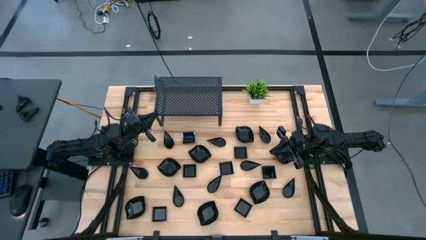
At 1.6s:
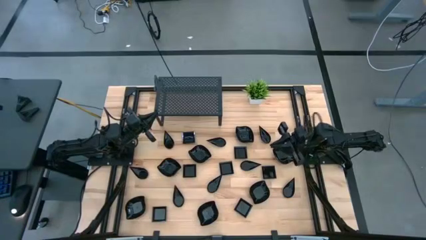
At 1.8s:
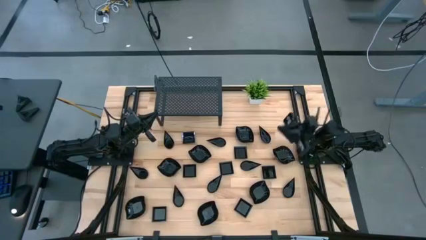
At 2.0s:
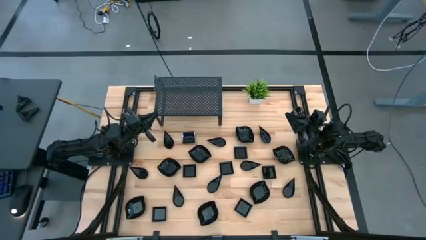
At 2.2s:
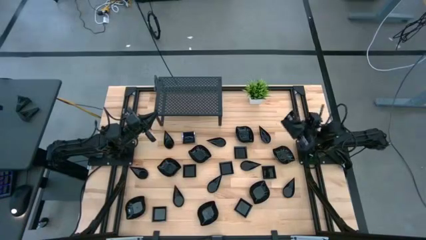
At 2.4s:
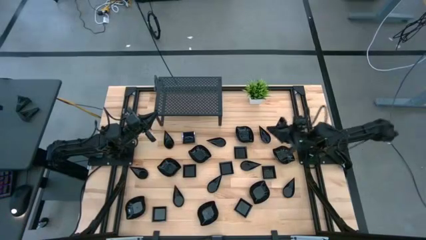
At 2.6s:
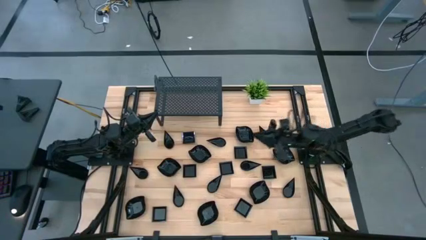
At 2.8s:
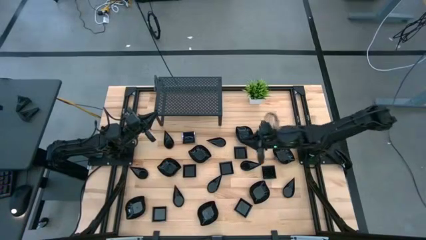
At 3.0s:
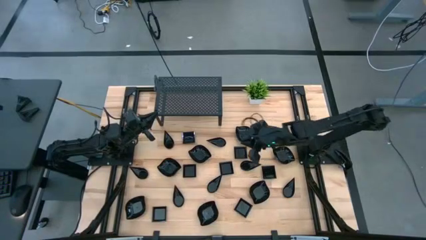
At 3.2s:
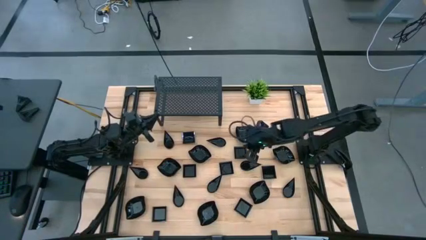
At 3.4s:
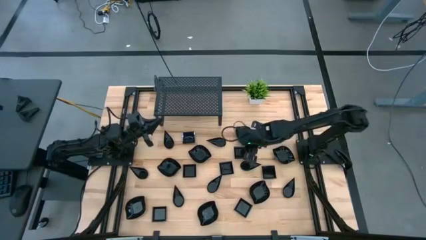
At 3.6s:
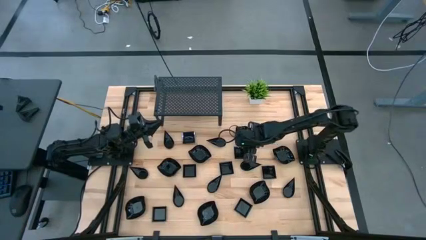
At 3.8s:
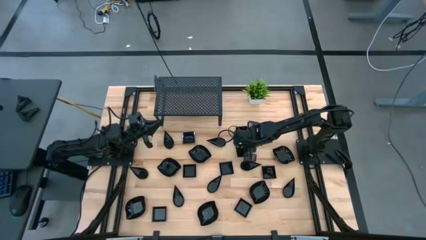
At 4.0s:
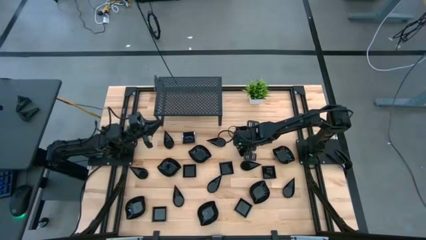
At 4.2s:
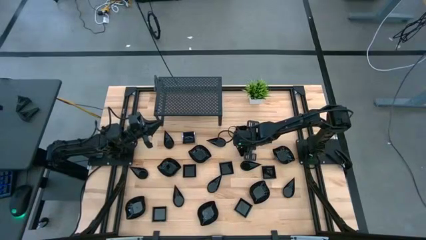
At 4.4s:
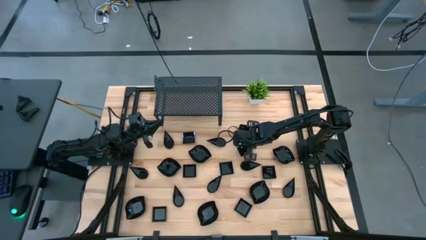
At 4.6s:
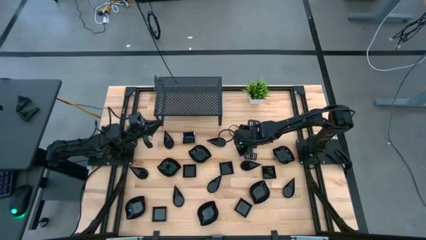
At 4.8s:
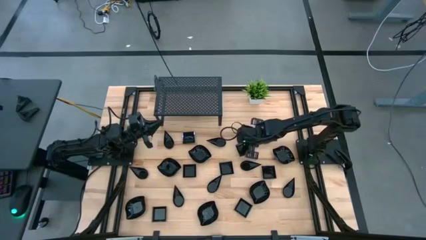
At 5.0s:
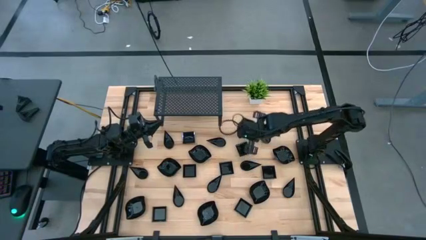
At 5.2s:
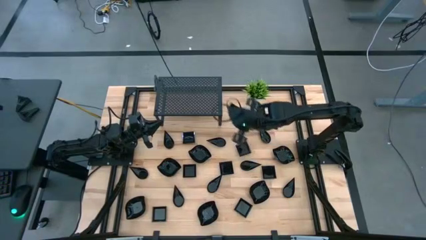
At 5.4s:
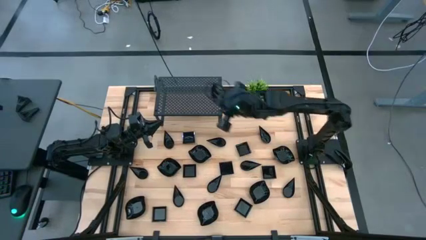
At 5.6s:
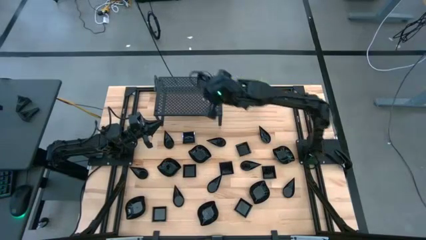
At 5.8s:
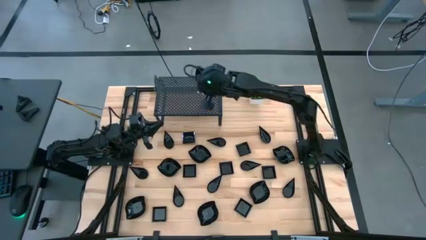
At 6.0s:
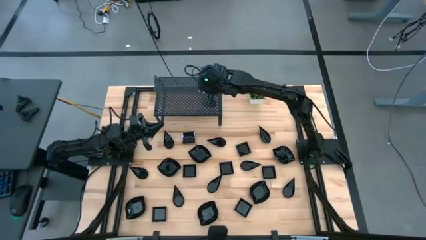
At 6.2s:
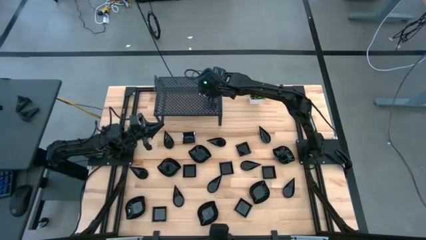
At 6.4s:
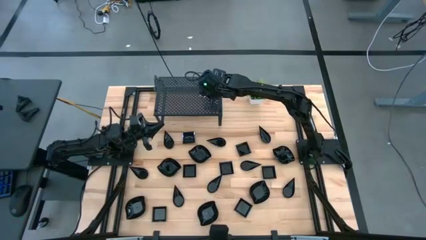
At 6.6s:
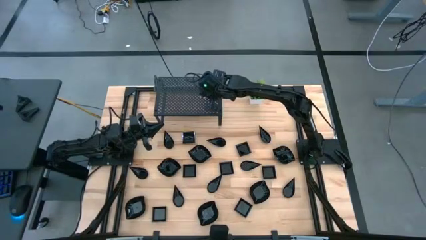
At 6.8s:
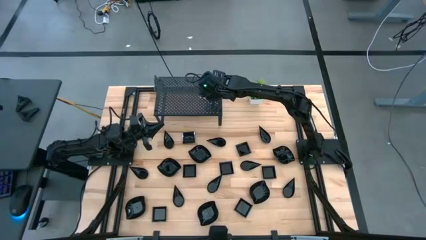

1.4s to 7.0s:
Task: Pick & Place Mini shaped plates
Put the black leaf-shaped plate on the shelf

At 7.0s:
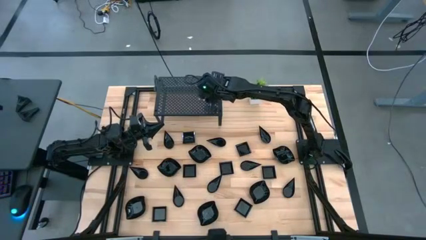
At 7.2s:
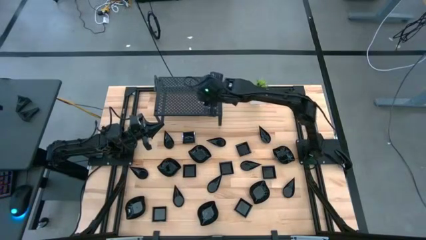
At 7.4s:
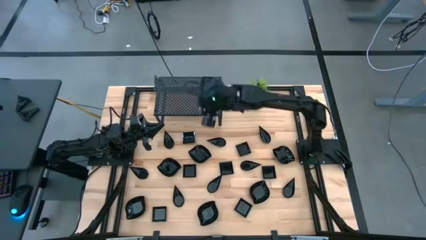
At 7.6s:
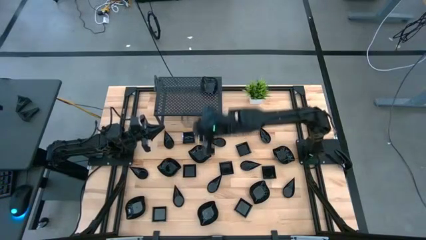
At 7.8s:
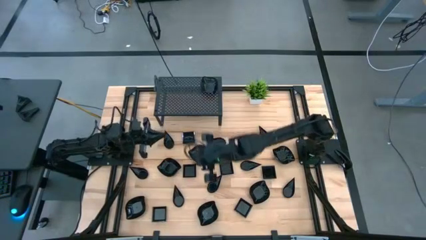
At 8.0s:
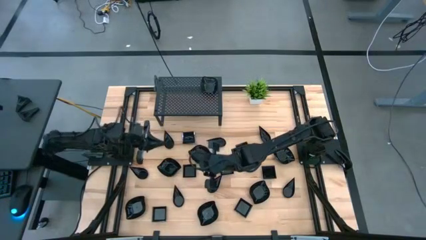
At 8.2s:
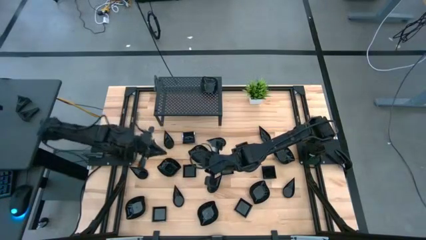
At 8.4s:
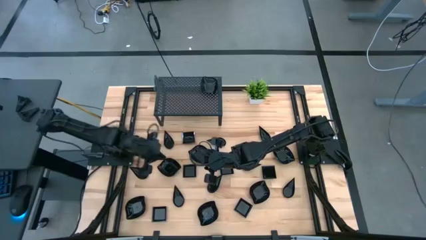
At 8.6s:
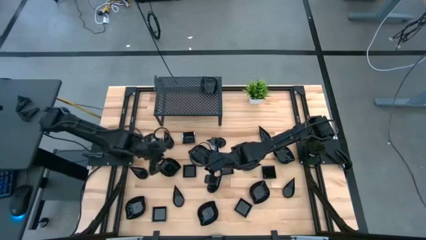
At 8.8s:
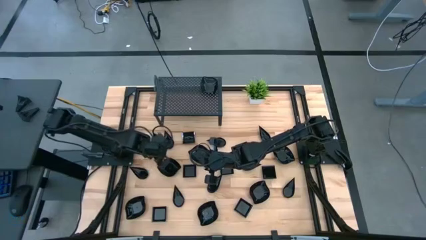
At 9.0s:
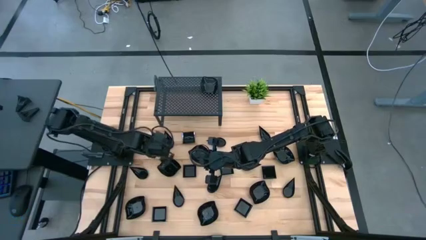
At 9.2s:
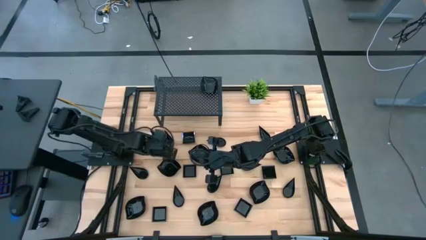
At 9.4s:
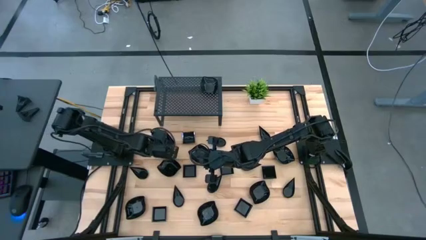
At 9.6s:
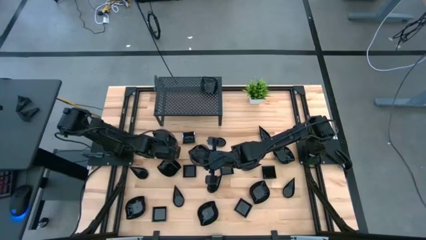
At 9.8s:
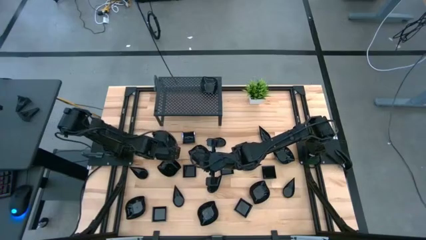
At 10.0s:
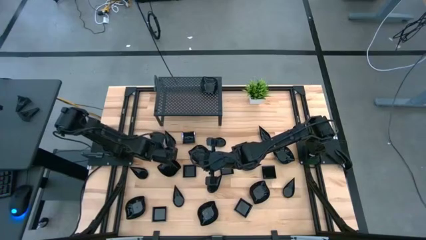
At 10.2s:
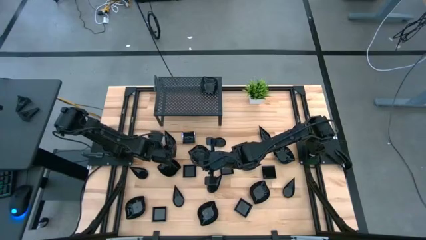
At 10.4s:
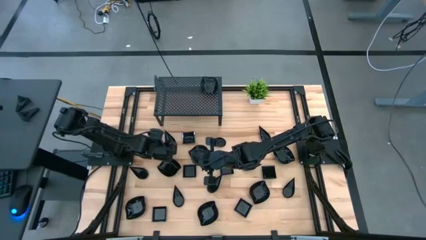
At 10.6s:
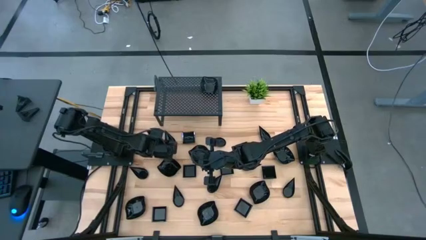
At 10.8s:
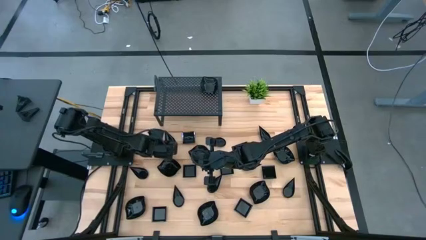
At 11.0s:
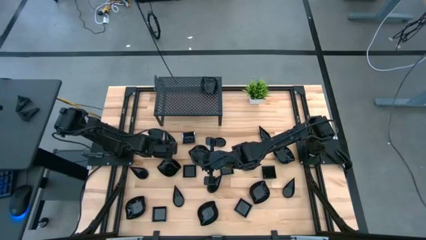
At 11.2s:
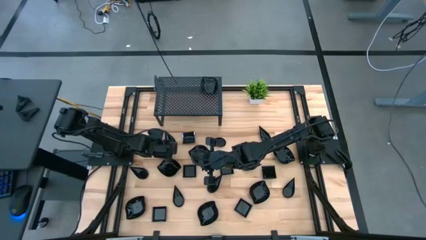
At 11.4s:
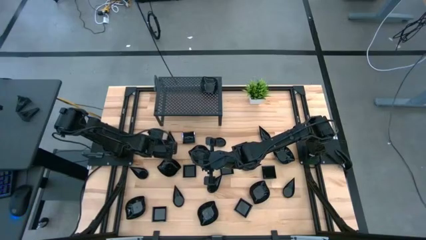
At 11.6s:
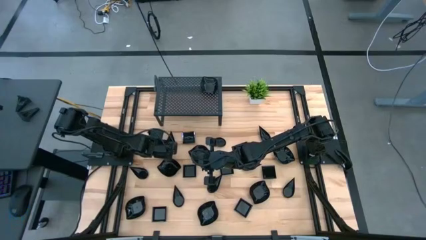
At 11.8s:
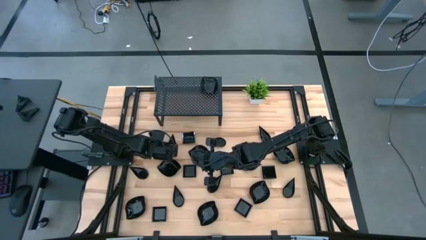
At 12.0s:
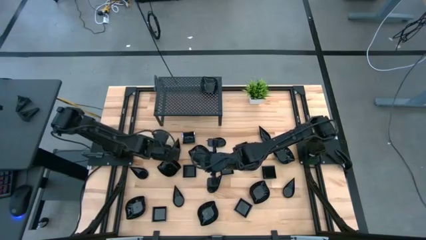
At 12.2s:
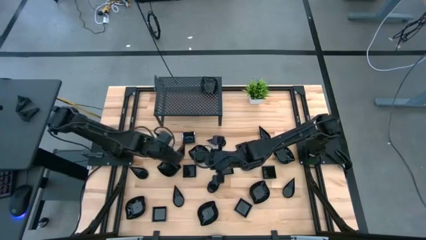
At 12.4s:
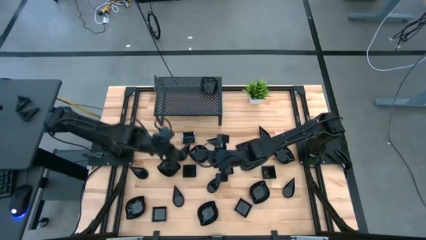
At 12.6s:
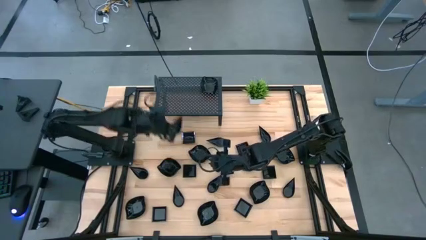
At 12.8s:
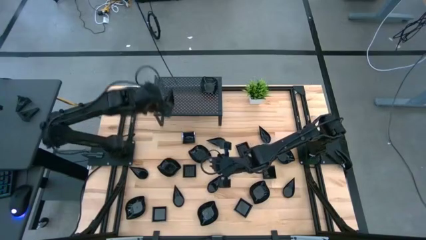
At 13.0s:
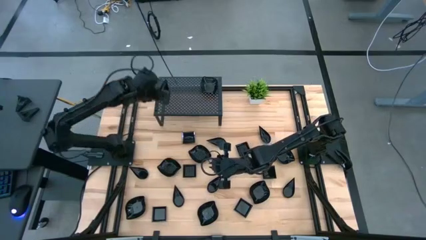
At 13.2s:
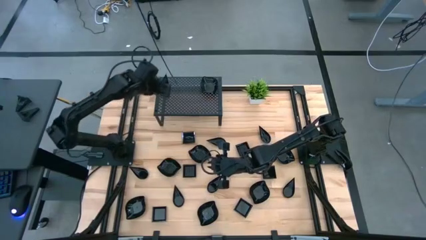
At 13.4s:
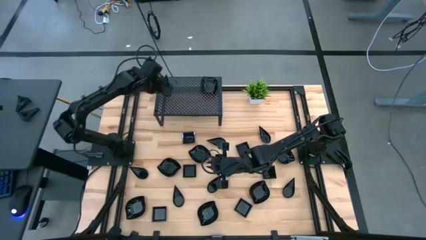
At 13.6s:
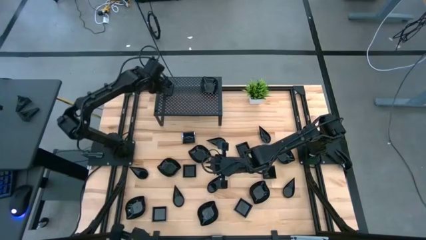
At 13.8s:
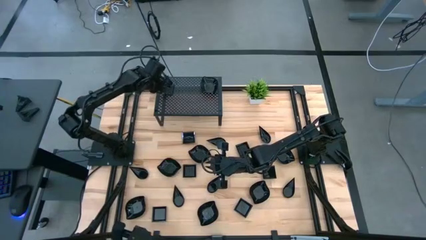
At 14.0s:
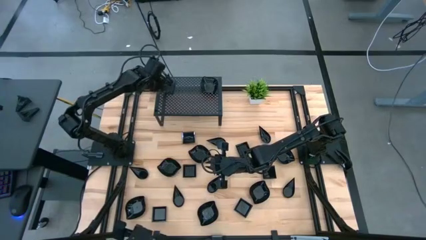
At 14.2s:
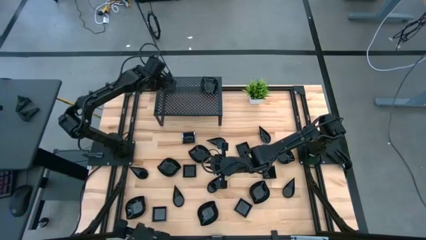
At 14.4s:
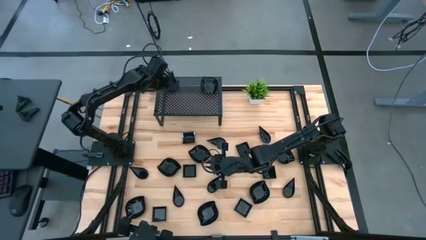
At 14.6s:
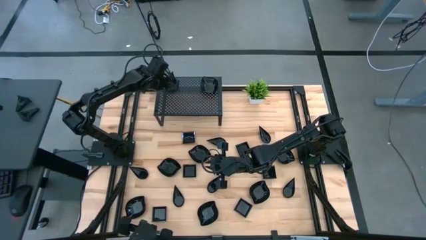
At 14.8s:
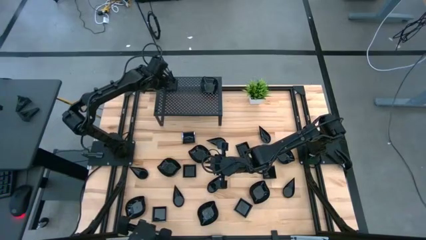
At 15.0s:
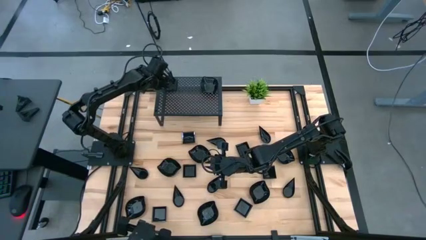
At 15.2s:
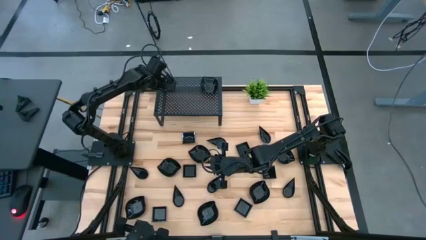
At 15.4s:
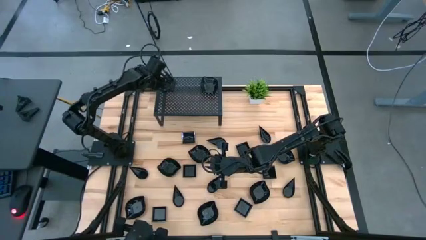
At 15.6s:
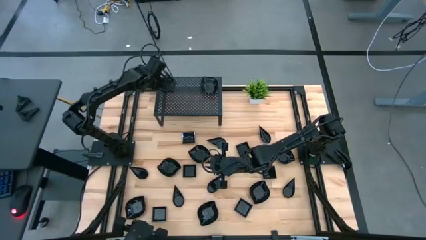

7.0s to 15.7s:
Put the black drop-shaped plate on the shelf

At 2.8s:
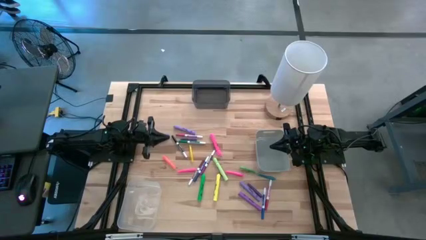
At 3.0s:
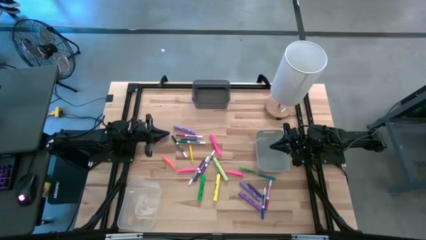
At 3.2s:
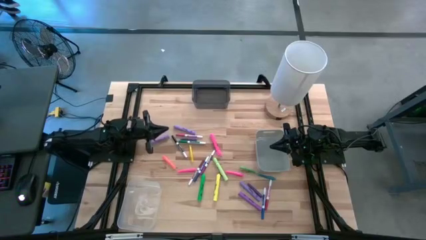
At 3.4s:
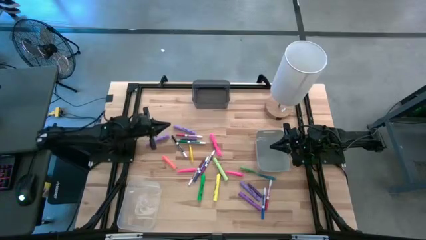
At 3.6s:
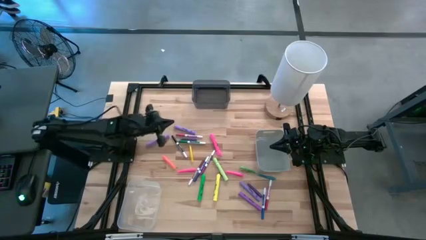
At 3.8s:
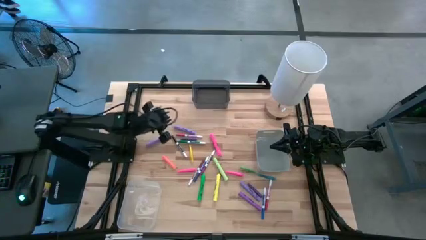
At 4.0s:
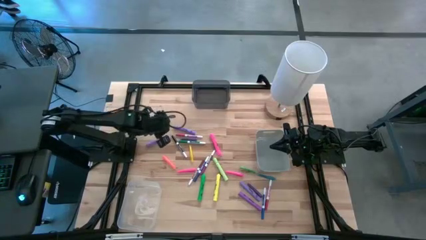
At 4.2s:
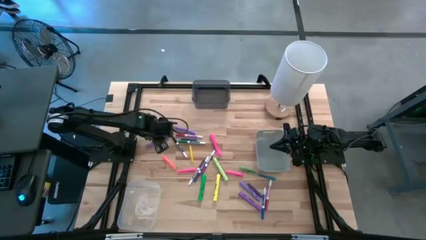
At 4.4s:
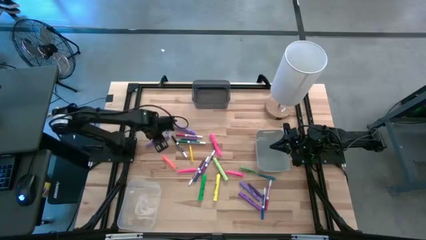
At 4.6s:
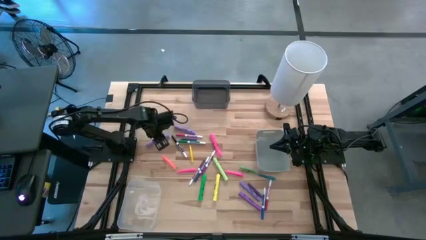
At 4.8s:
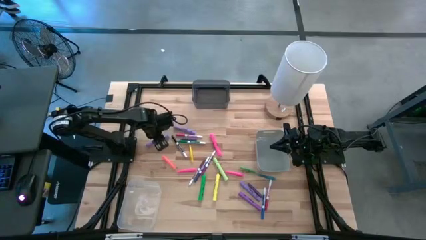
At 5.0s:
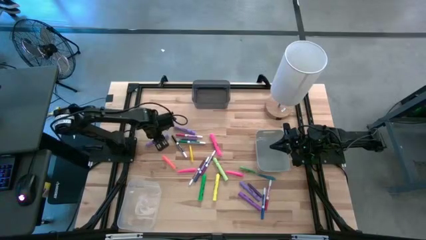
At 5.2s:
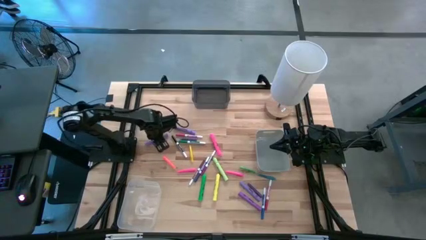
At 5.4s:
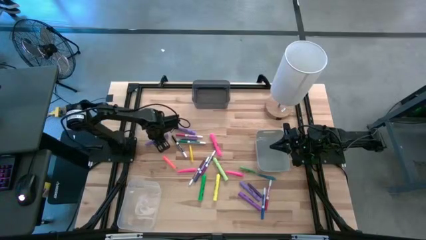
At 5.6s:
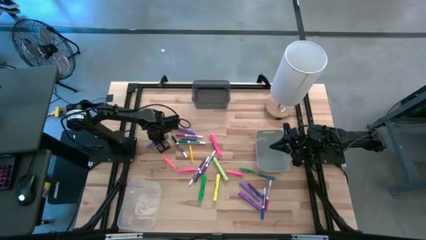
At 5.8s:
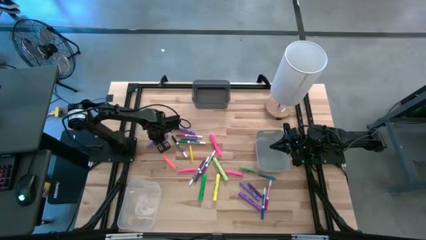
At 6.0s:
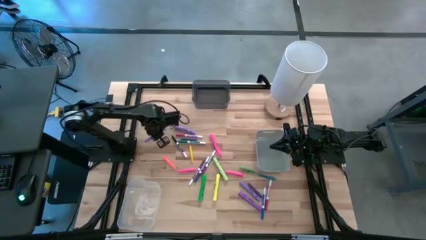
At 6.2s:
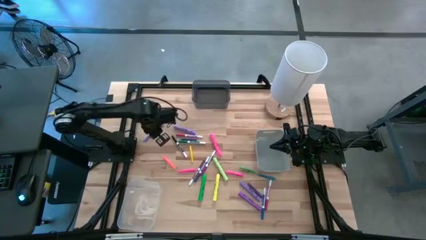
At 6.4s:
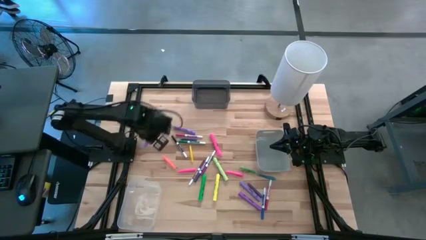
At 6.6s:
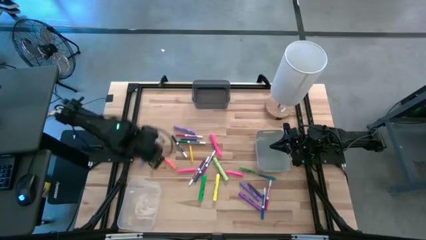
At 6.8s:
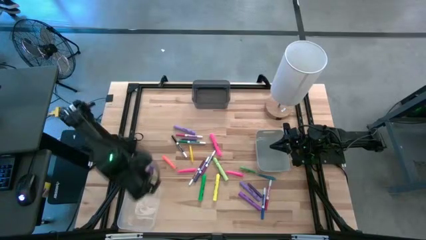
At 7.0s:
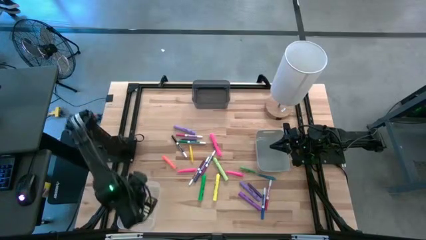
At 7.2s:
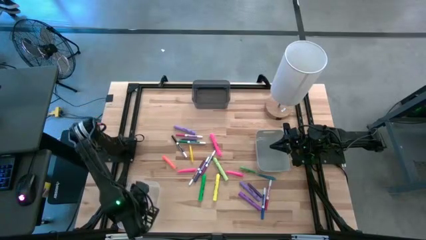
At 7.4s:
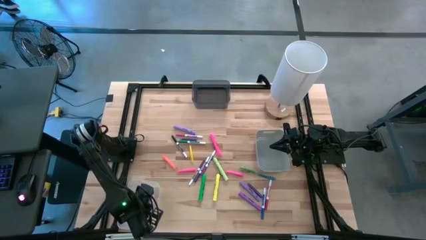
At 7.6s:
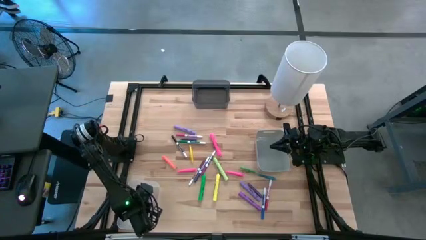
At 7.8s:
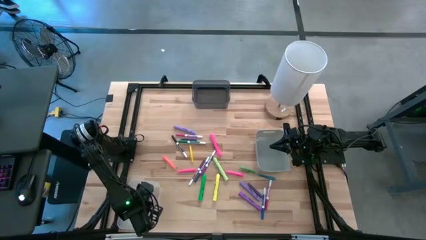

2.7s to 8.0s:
Task: Pick & Place Markers
Put the top left purple highlighter pen into the transparent bin
